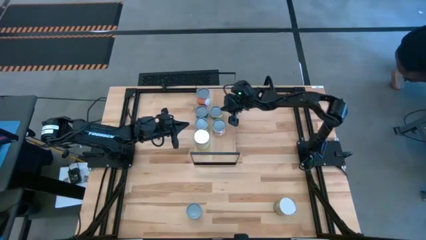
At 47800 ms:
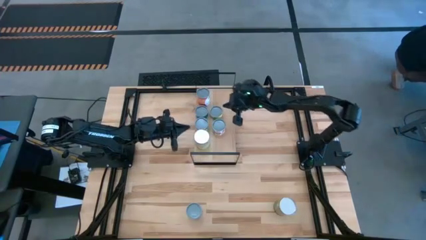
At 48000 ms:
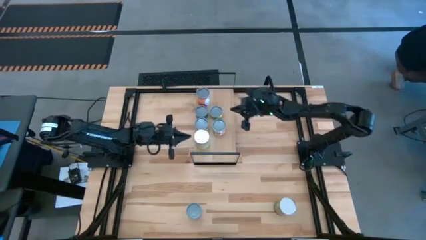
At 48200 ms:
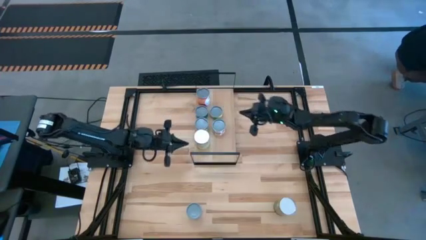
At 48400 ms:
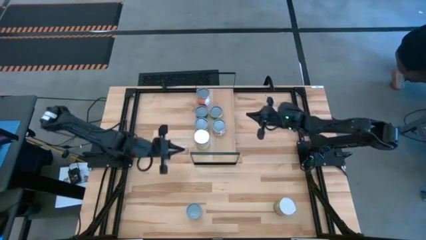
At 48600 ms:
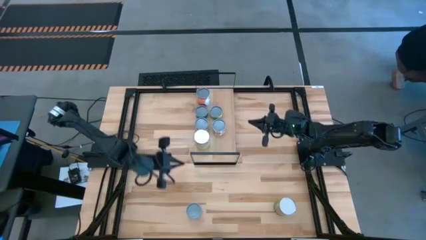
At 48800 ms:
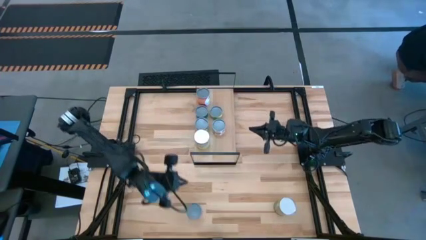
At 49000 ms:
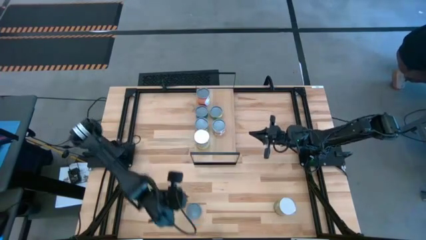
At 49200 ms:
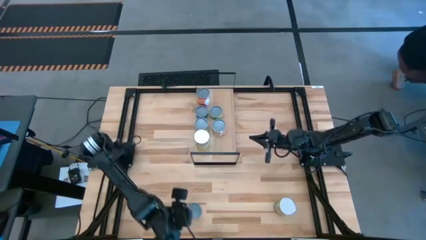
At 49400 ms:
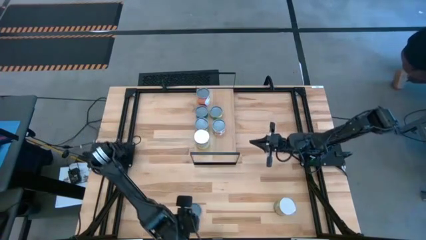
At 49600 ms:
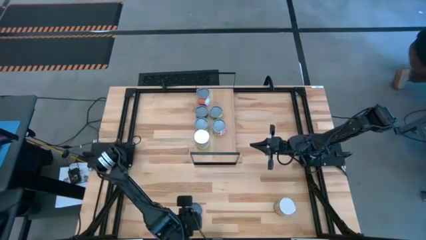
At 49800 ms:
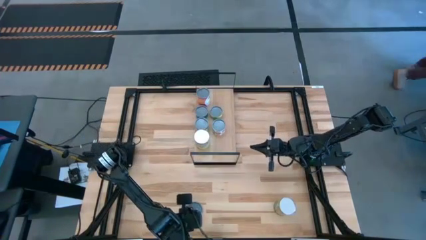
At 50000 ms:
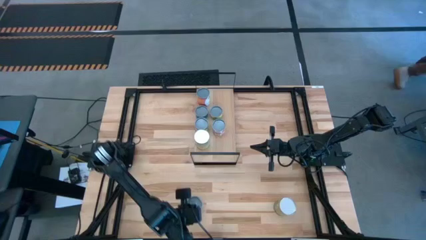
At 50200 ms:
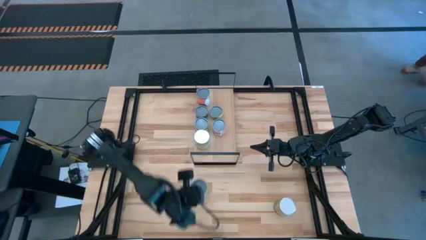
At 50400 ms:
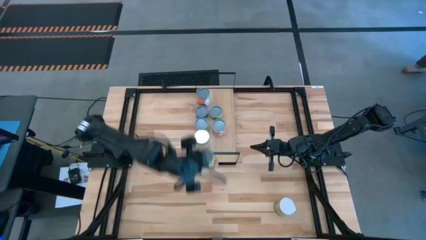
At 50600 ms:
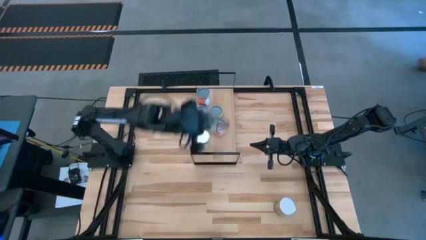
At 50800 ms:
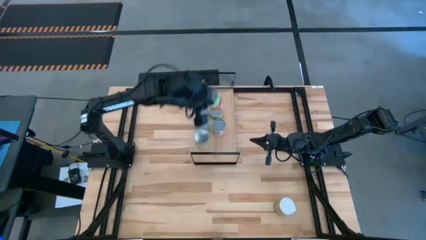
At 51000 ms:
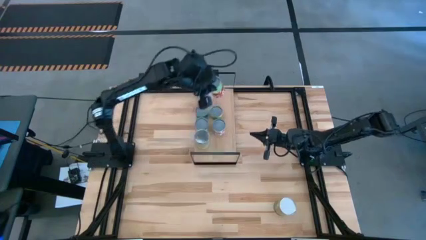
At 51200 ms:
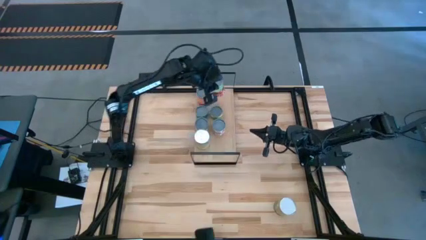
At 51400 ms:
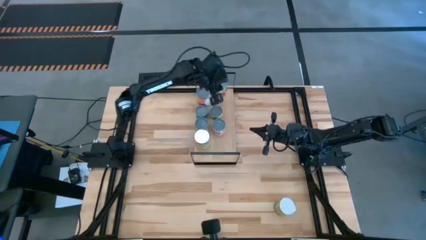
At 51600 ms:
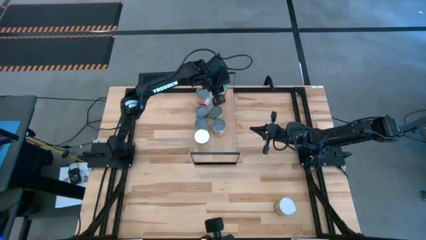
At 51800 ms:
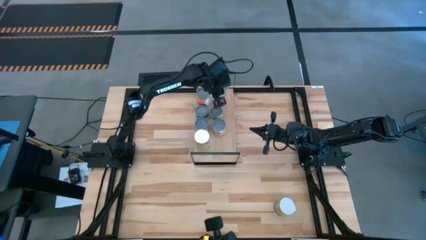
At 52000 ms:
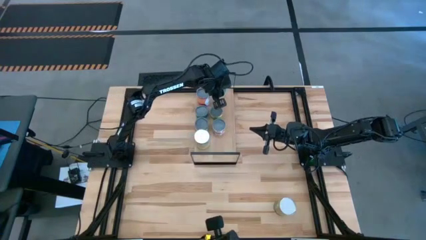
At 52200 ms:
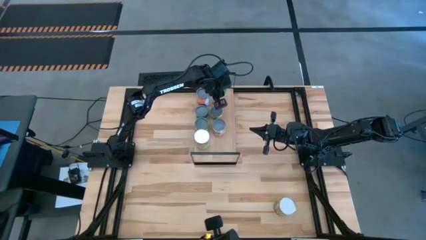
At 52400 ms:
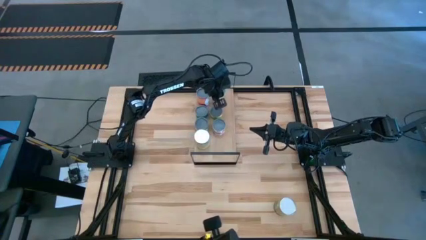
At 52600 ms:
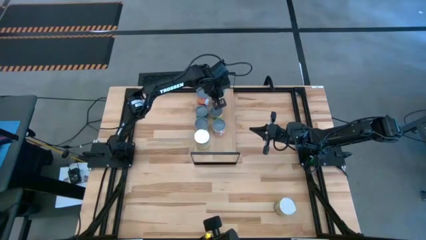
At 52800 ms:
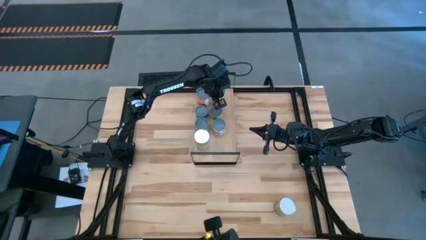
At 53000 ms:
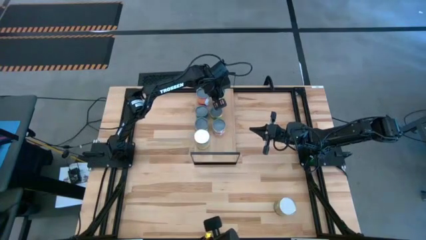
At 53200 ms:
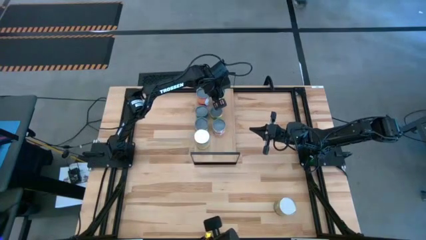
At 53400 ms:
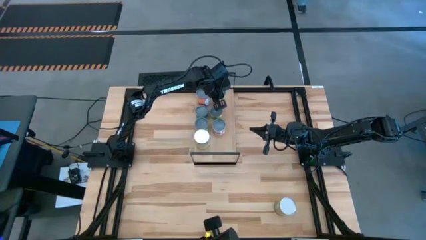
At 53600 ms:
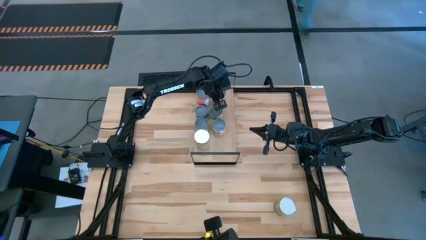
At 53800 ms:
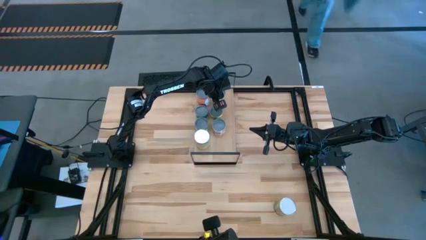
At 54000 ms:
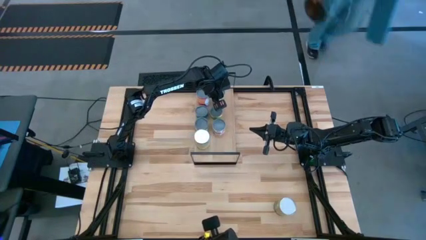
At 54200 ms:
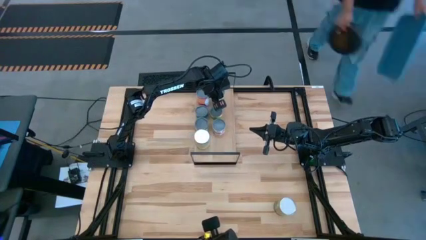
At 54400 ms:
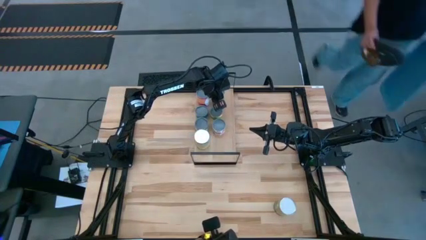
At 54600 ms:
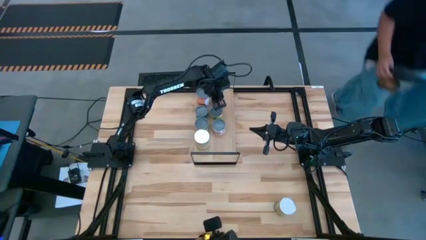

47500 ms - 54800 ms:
Task: Pick and place cans onto a shelf
Put the large canned peas on the shelf aligned with the large canned mixed fruits

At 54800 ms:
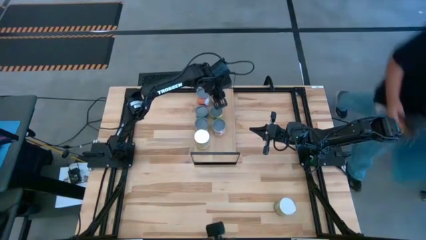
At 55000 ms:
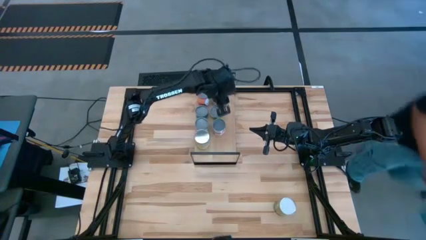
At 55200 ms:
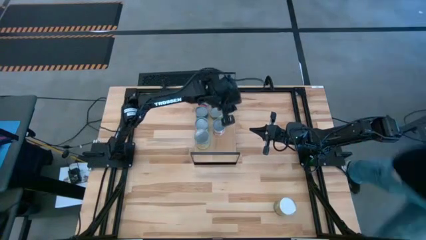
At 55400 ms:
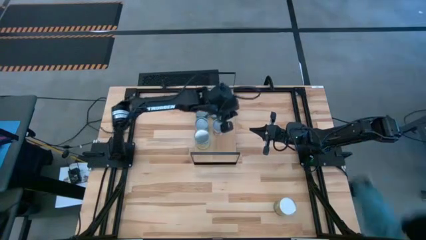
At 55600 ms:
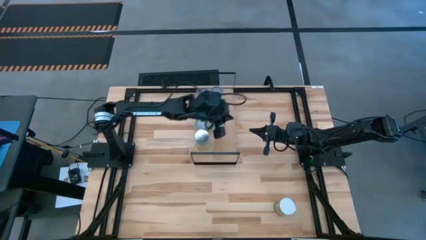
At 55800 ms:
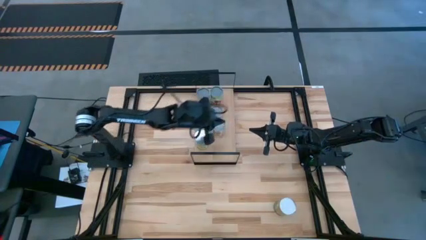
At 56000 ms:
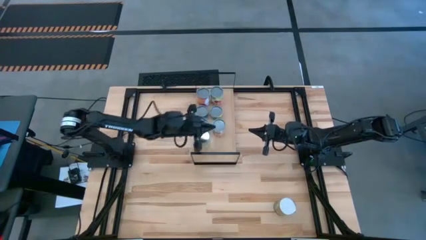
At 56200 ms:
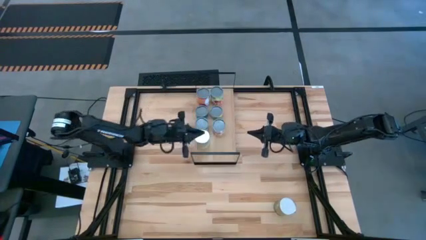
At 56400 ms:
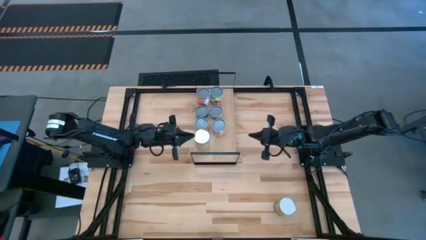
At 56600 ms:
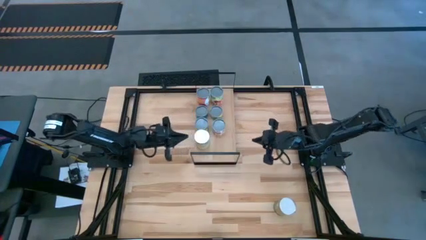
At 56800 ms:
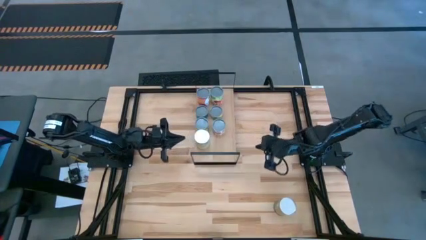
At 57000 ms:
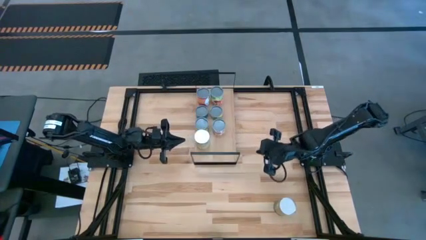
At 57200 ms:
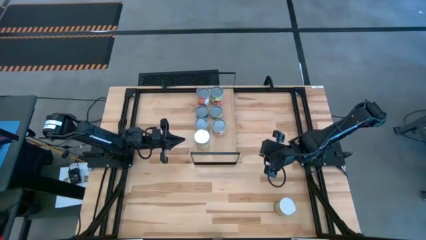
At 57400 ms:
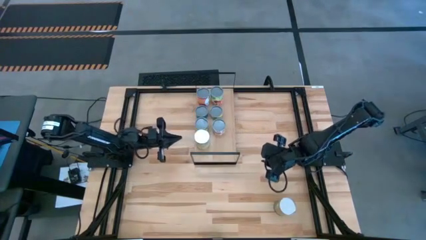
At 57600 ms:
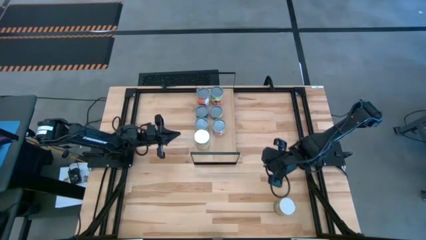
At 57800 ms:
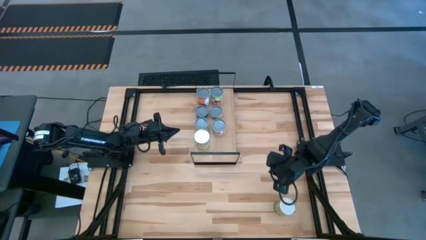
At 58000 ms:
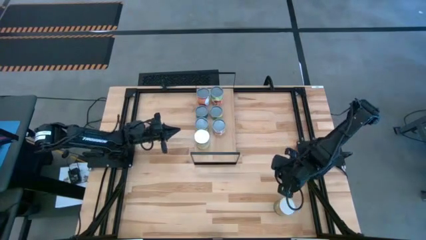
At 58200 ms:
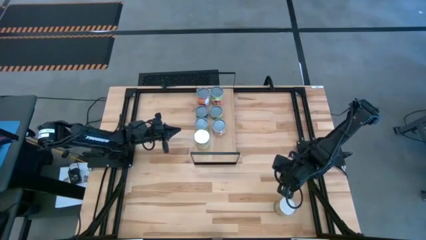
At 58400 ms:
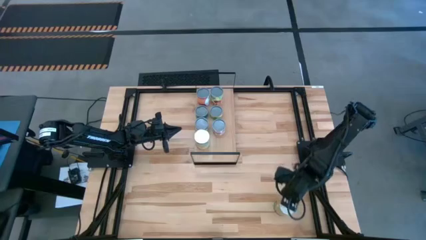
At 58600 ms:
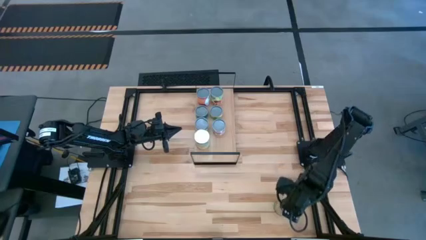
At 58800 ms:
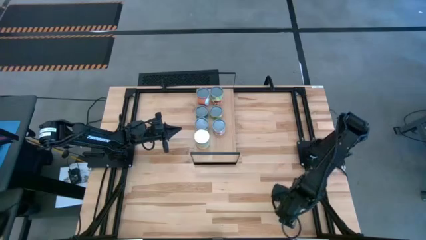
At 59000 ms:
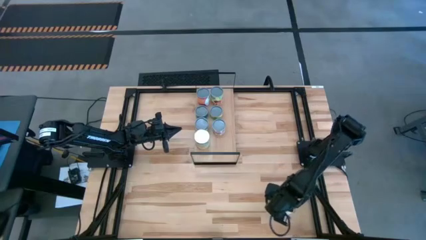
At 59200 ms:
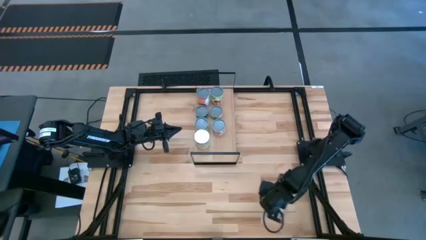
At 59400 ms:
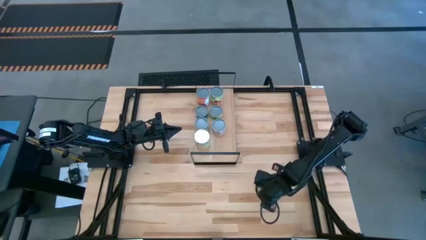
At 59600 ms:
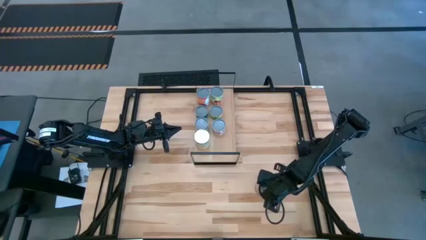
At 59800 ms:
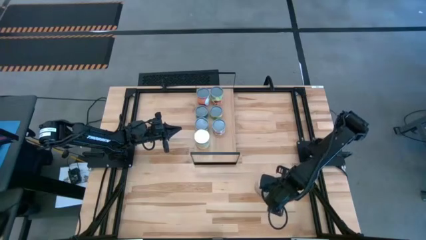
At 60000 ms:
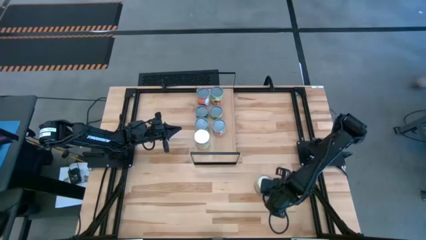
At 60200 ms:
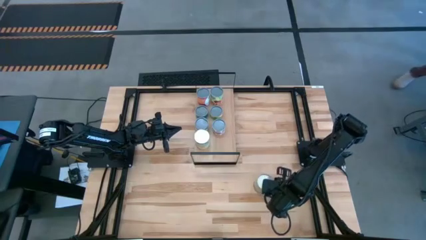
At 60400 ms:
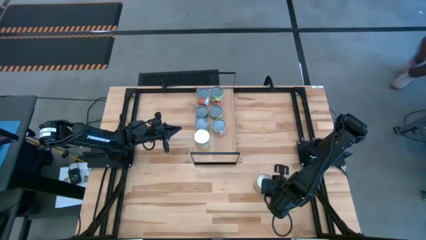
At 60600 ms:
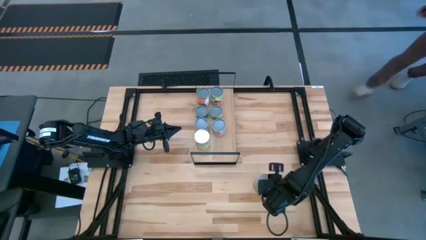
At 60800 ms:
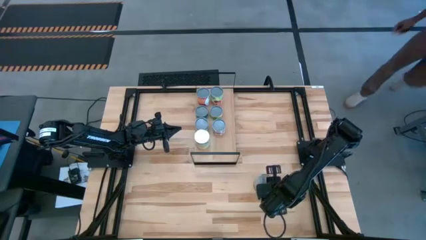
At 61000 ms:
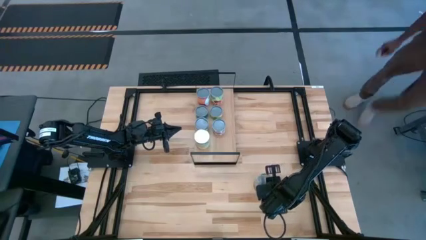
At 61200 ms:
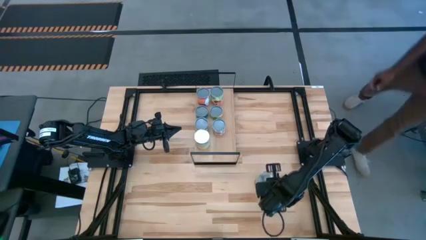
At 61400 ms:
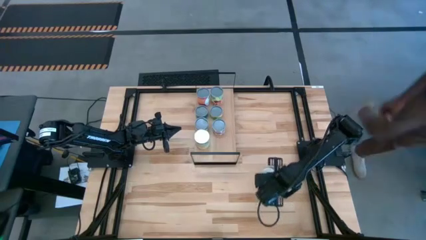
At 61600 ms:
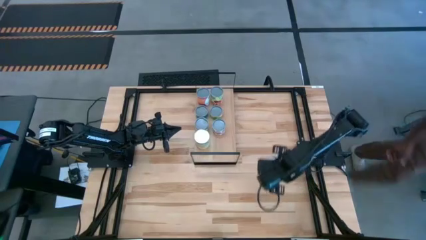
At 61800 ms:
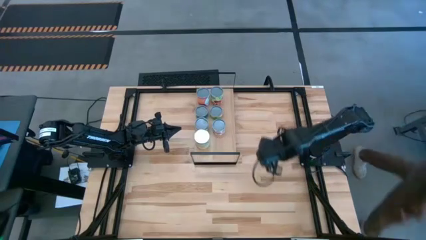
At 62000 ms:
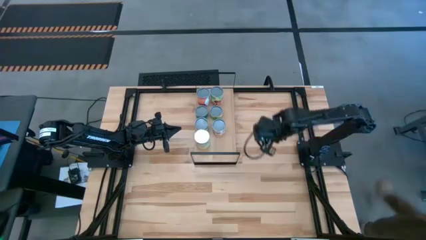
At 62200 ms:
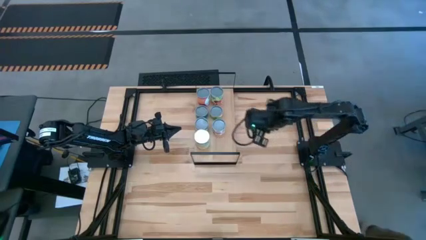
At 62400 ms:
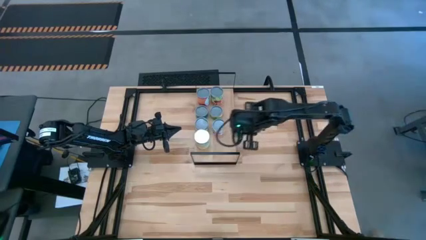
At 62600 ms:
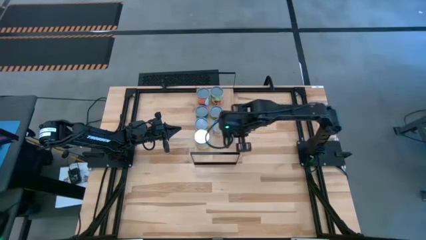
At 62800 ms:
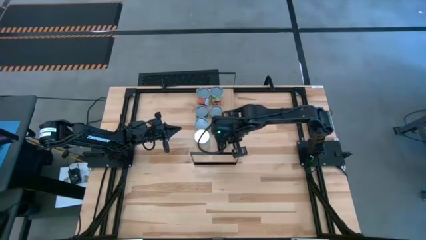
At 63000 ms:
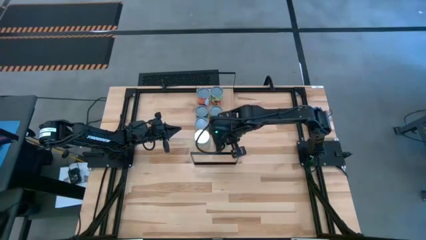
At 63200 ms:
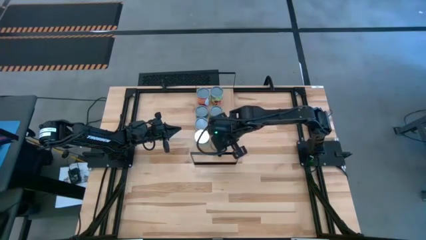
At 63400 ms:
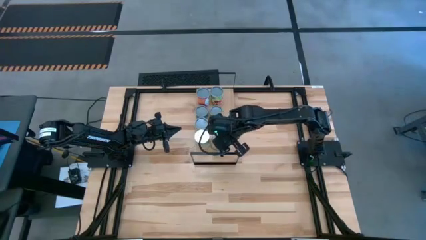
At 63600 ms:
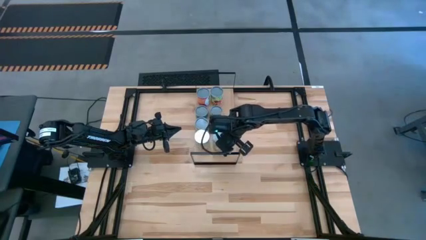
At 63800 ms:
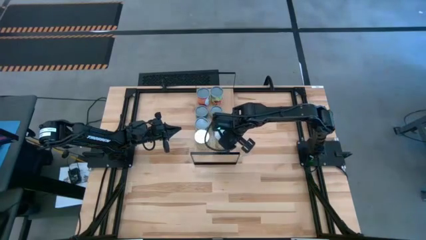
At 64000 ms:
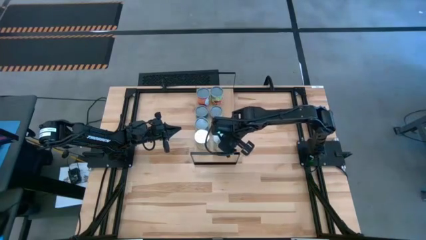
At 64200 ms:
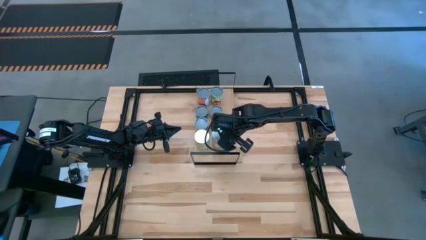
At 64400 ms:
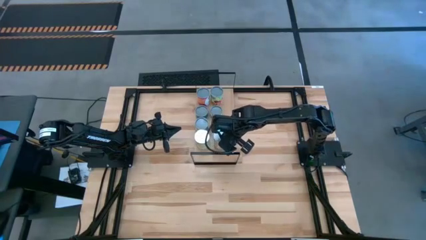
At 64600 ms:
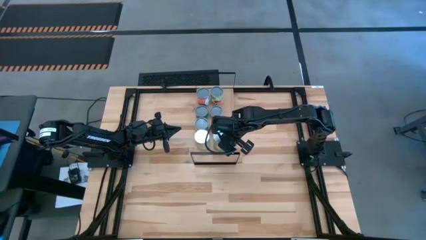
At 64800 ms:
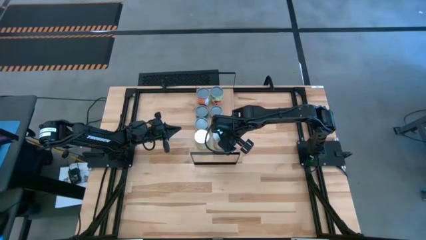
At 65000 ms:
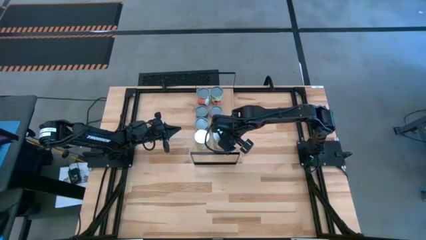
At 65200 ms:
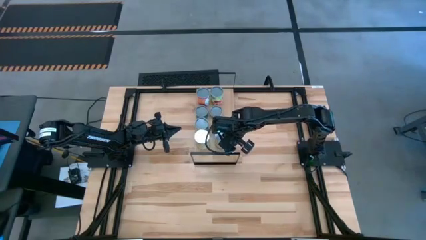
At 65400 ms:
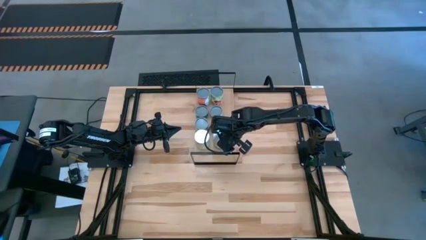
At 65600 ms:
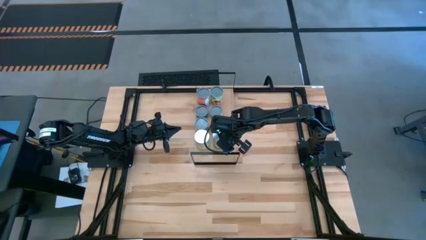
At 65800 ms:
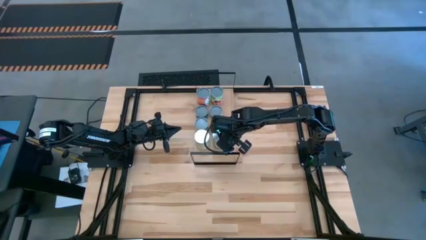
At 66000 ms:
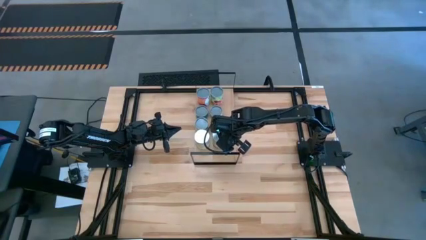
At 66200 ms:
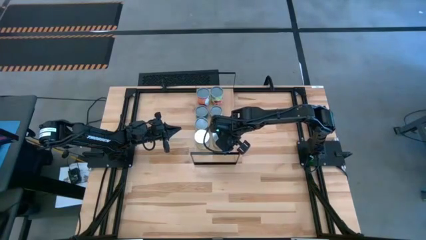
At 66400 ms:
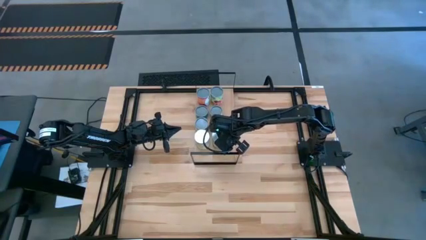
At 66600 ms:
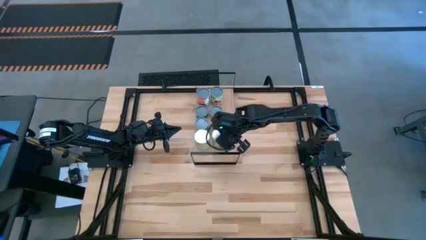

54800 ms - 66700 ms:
Put the large canned oranges on the shelf aligned with the large canned carrots
